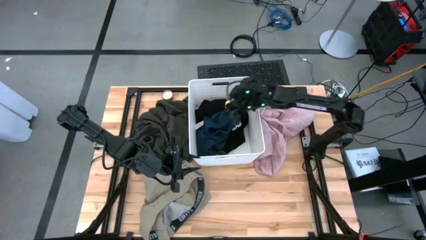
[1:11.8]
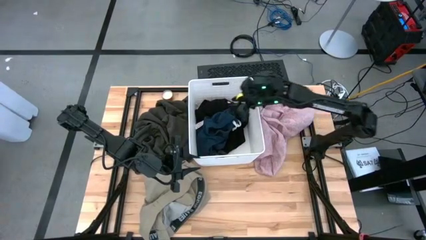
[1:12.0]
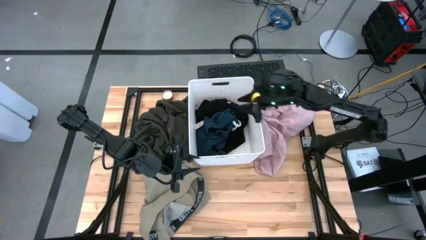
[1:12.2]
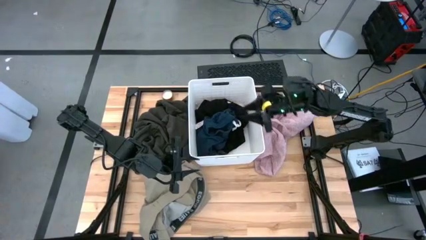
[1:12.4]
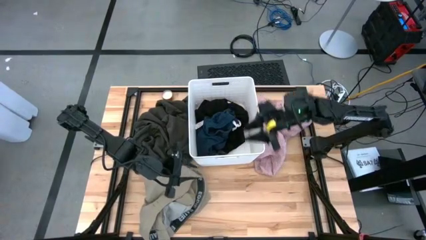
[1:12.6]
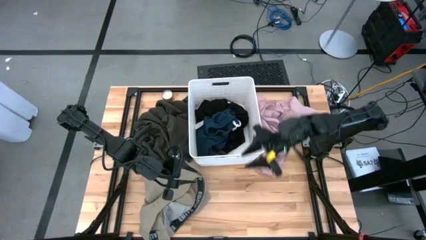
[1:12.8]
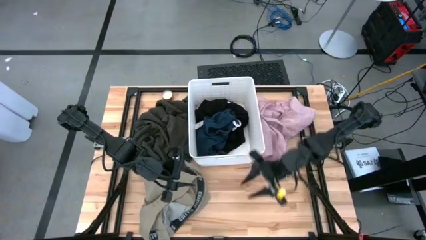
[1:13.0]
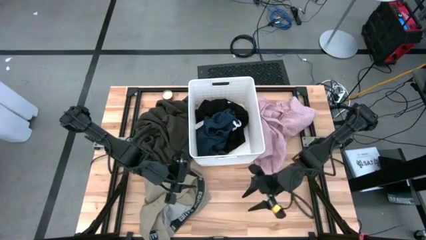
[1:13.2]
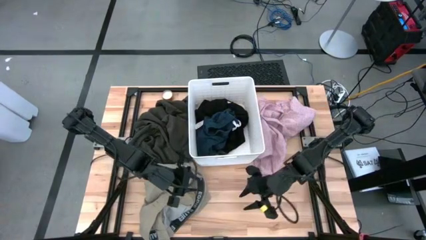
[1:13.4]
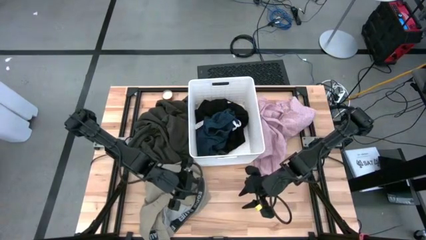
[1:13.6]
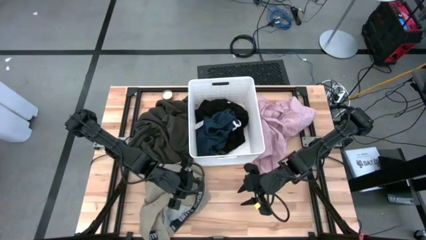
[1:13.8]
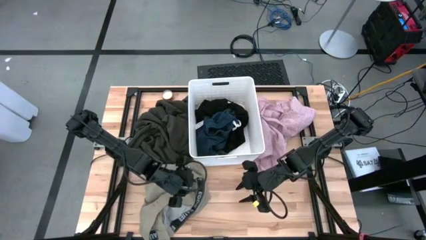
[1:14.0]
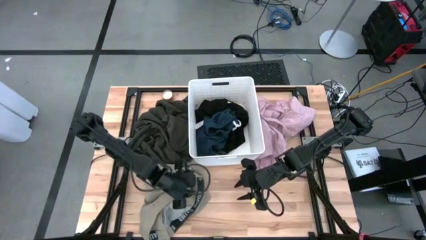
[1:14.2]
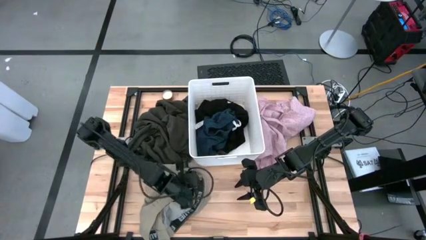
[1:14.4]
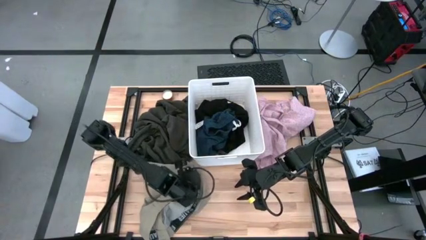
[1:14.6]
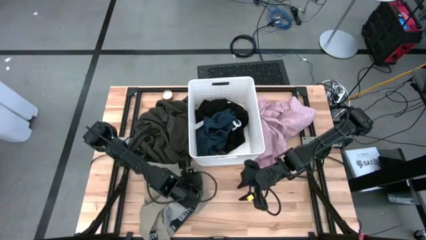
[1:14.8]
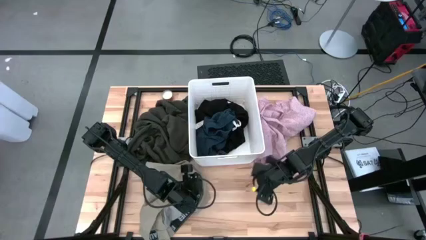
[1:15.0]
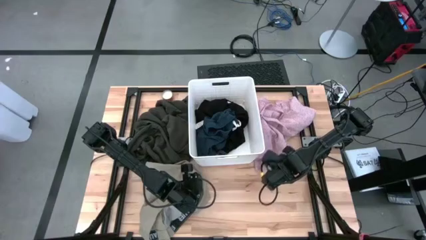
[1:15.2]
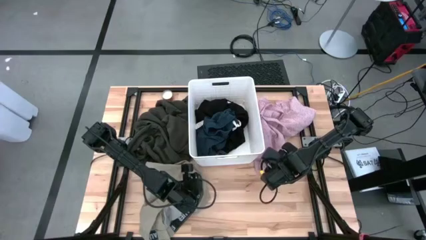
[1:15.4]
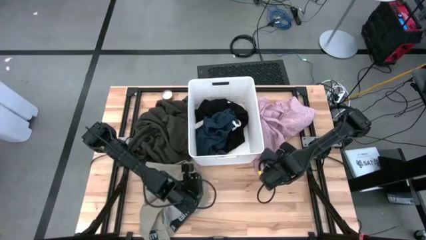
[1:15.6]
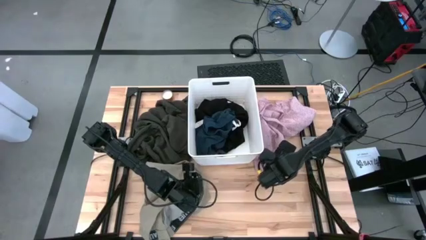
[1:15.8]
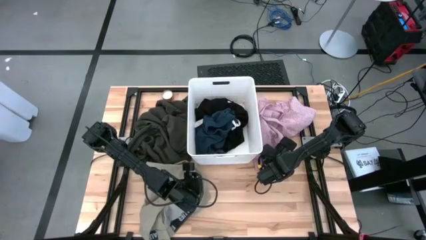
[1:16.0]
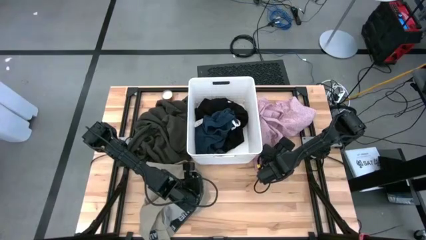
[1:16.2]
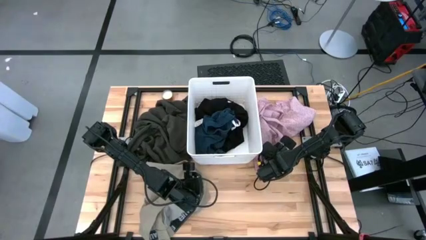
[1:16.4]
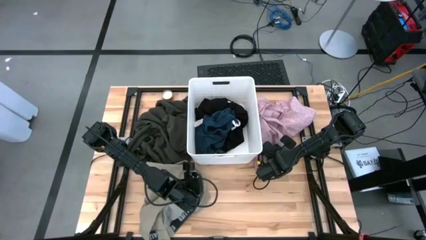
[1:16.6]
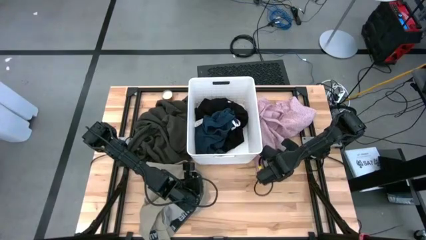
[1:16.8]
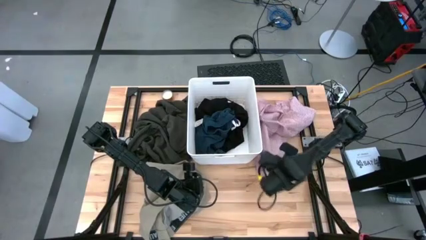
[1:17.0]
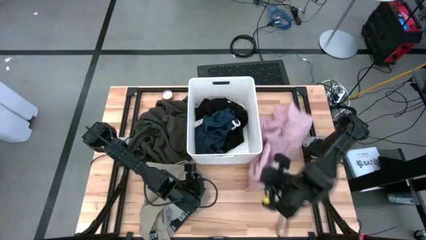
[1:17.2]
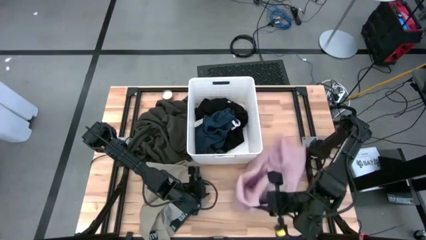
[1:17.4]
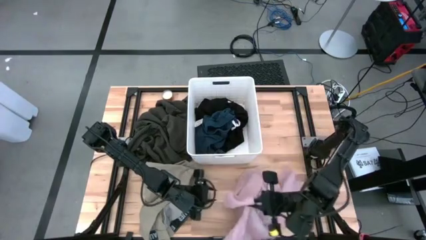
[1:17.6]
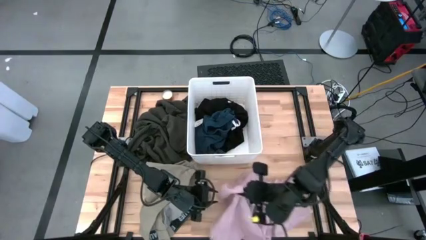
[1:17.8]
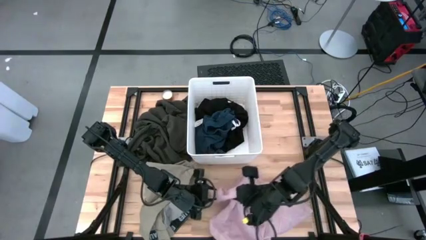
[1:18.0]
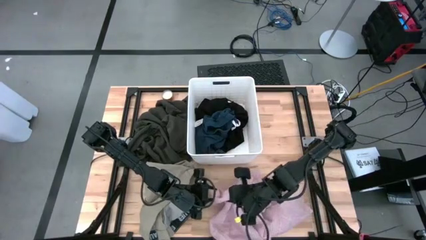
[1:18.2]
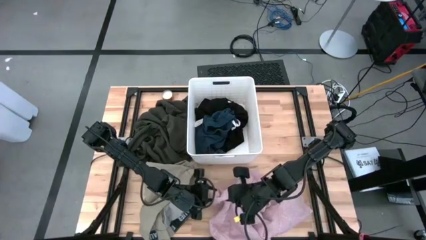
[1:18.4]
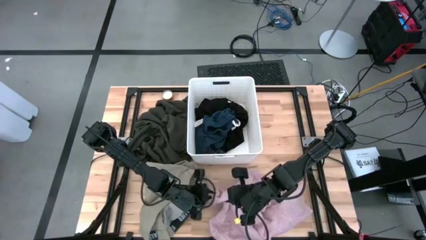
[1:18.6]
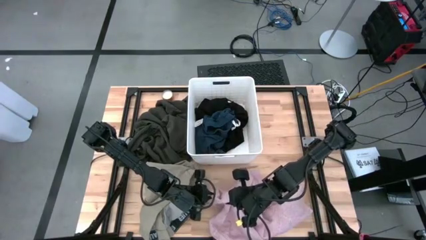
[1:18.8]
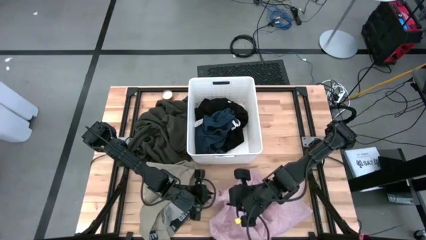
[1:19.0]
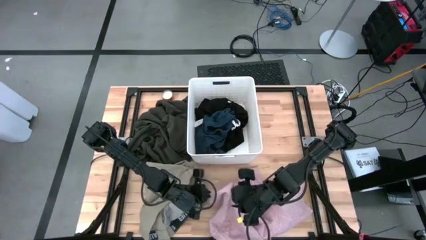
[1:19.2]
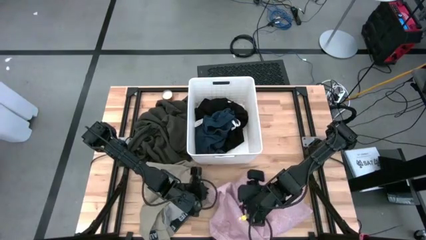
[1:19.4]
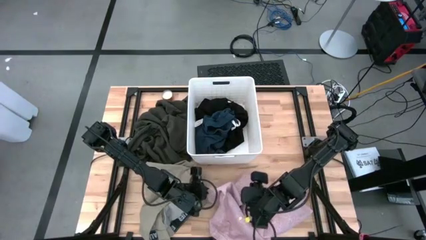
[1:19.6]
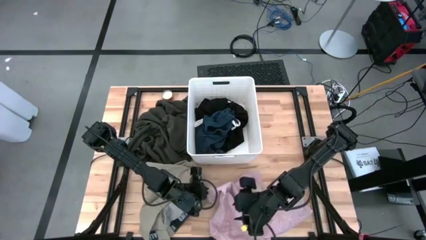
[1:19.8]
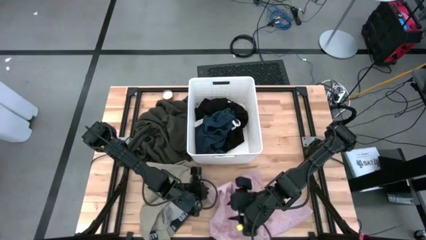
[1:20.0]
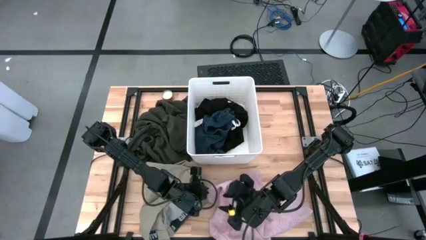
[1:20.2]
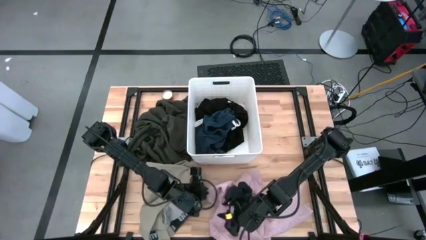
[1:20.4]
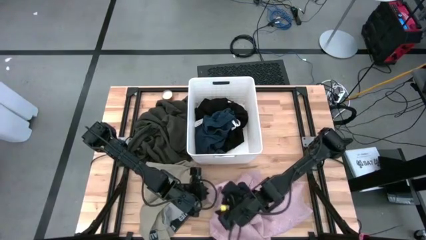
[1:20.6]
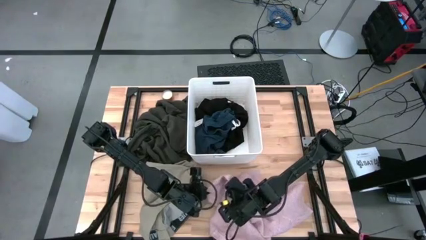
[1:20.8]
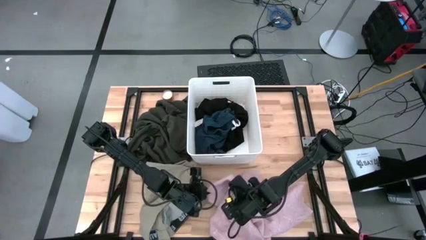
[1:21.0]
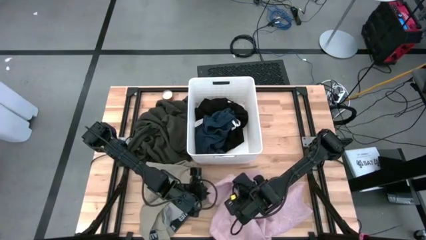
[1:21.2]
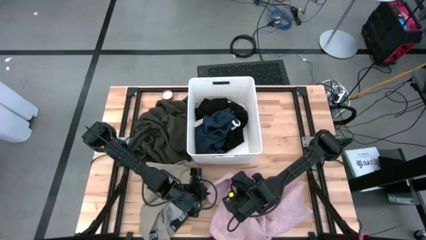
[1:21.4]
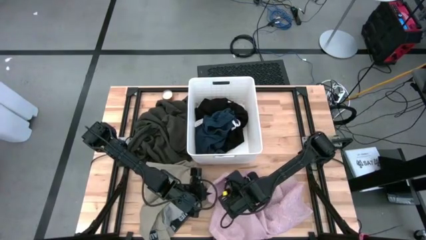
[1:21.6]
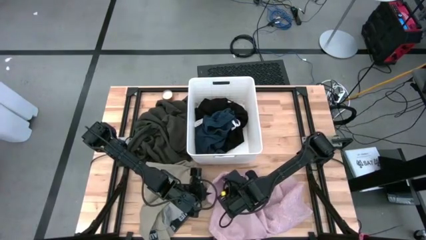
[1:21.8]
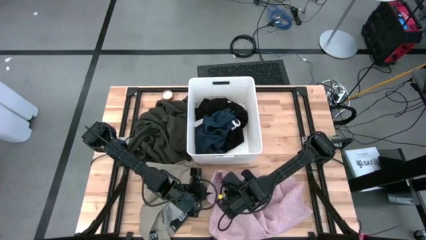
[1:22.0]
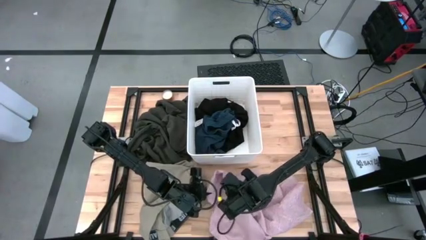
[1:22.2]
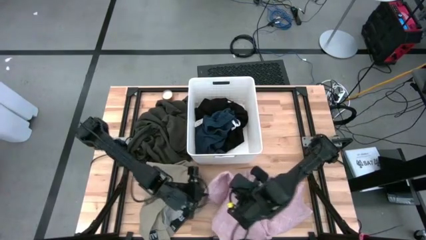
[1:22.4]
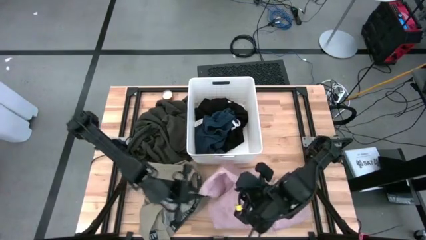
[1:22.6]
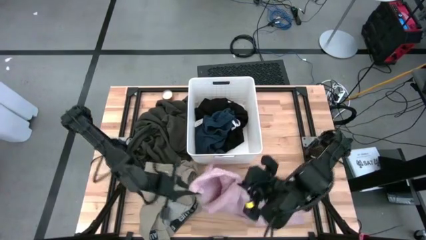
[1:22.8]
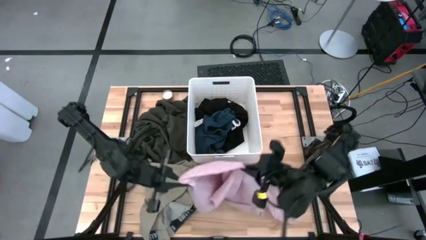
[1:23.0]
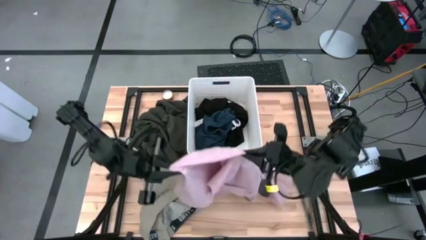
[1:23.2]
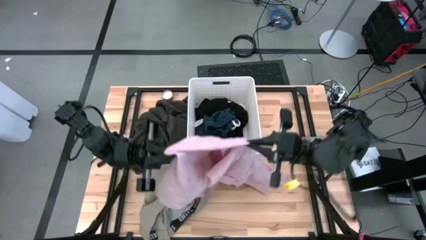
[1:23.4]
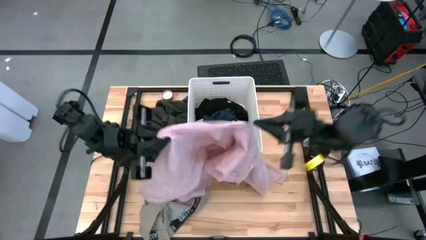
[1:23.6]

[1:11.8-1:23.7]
Task: Sort clothes
Put the pink polo into the laundry bin

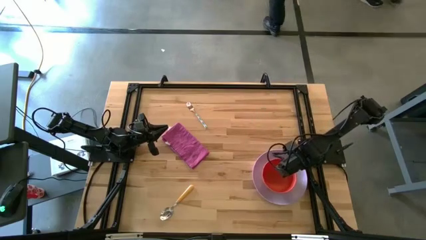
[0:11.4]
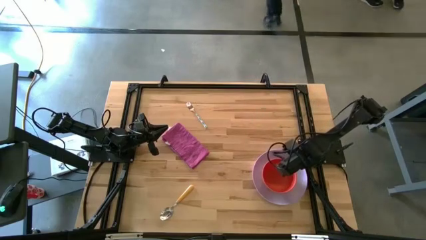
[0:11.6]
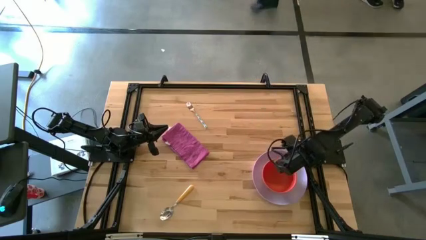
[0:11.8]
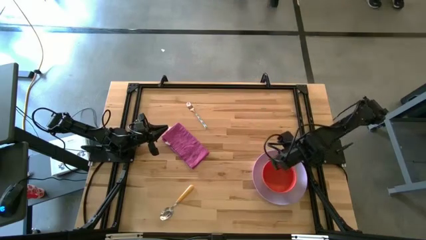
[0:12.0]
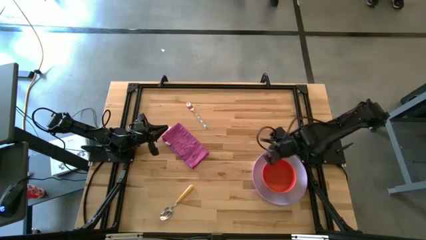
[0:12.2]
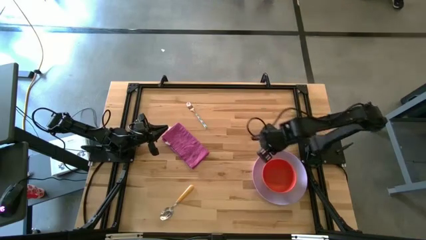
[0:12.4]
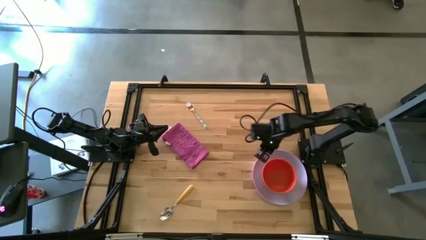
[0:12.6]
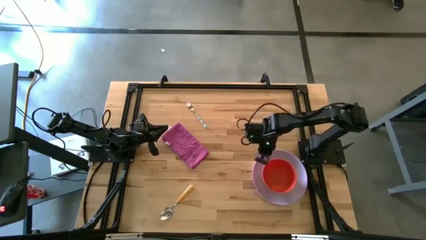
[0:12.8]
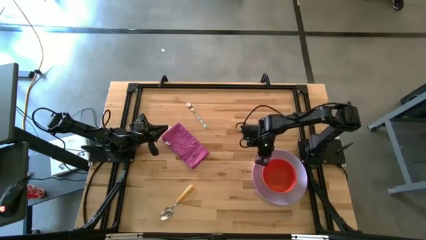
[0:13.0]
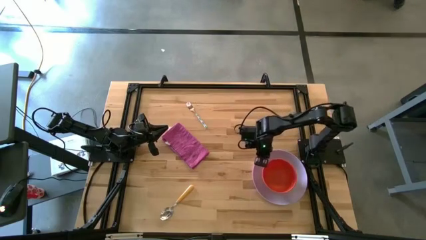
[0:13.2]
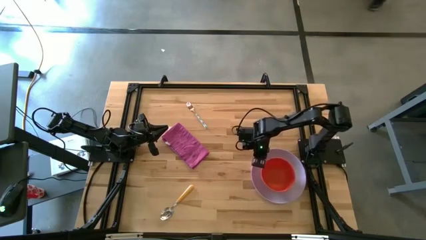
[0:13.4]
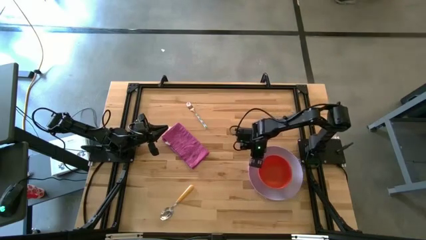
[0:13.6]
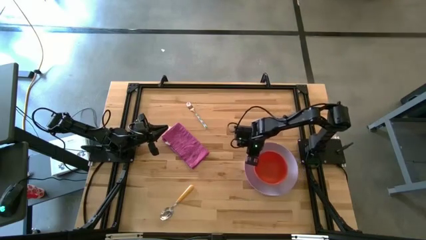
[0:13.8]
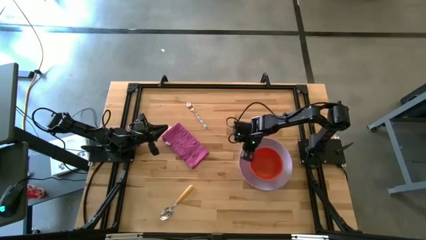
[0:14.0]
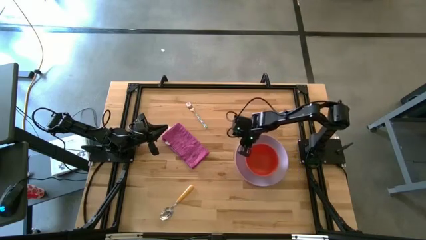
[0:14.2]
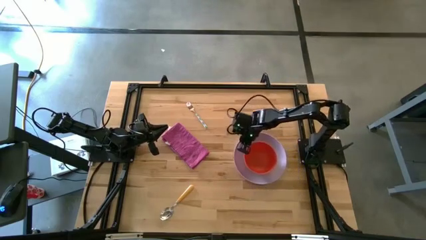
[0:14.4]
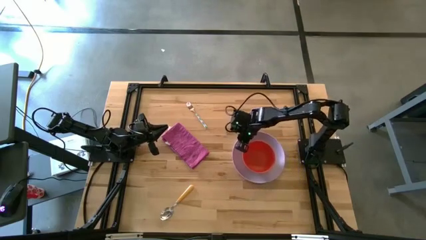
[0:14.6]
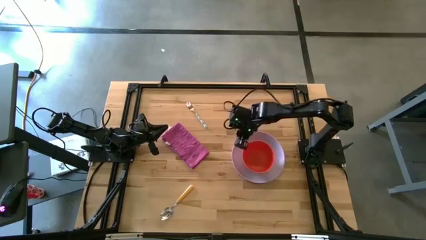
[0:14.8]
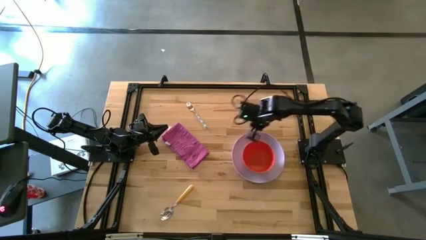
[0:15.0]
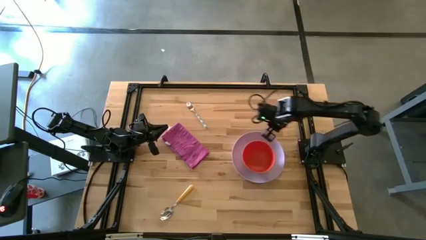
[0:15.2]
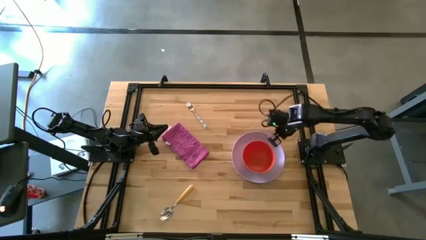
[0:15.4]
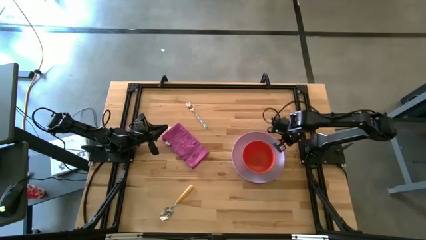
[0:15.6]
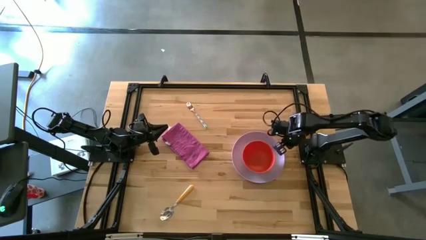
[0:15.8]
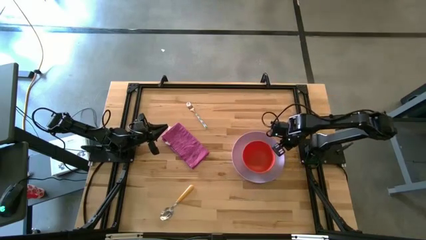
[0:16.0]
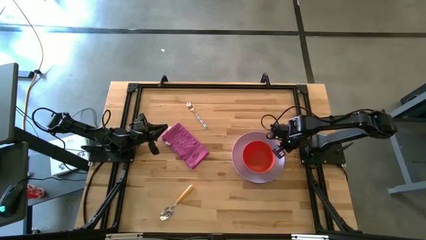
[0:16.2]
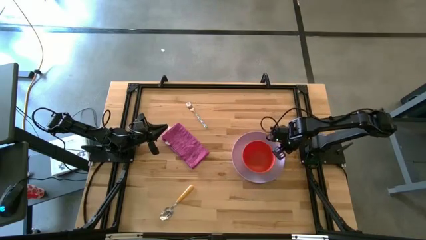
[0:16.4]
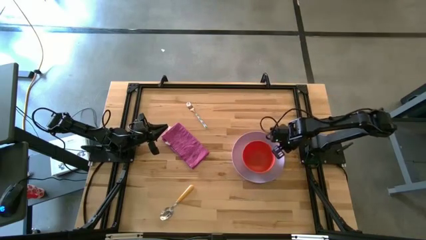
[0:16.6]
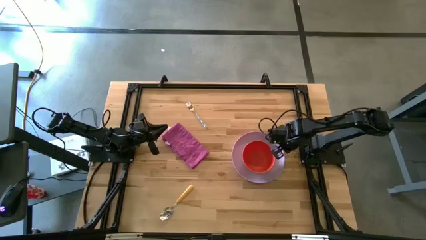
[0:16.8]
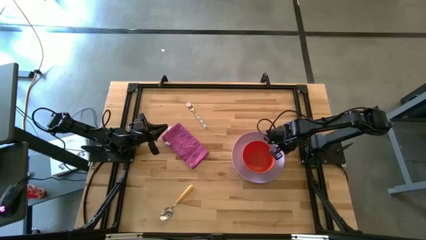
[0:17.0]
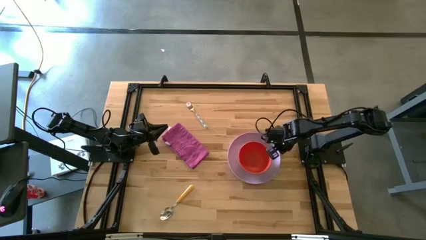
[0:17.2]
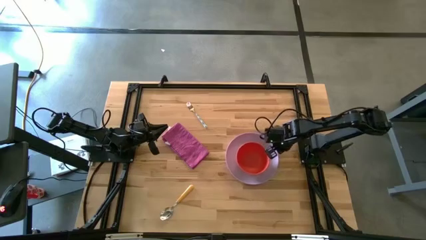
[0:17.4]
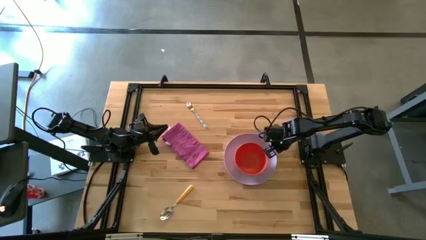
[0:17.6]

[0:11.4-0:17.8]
Task: Set table place
Move the purple plate closer to the middle of the table
